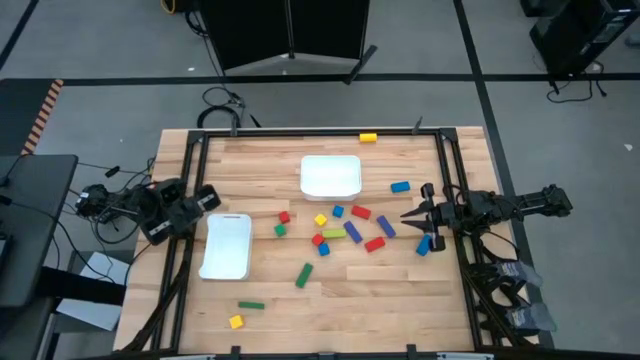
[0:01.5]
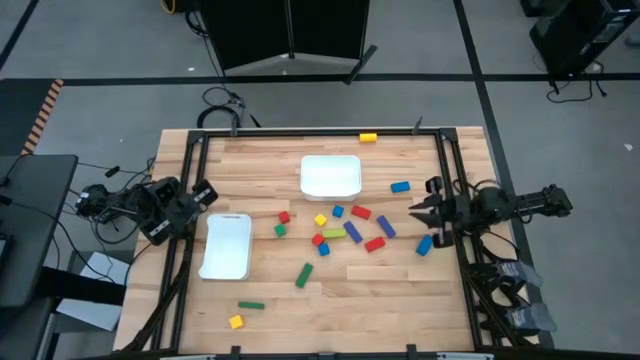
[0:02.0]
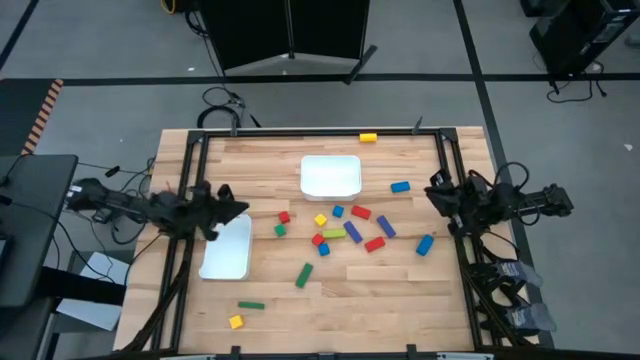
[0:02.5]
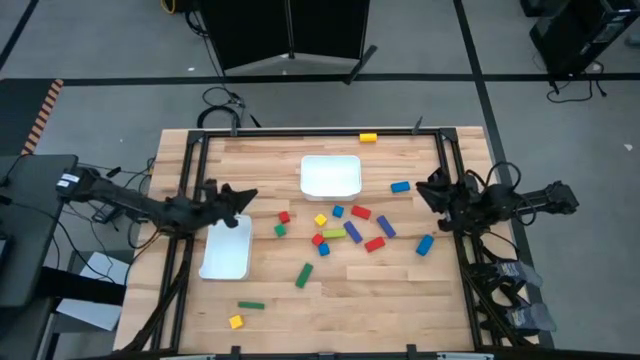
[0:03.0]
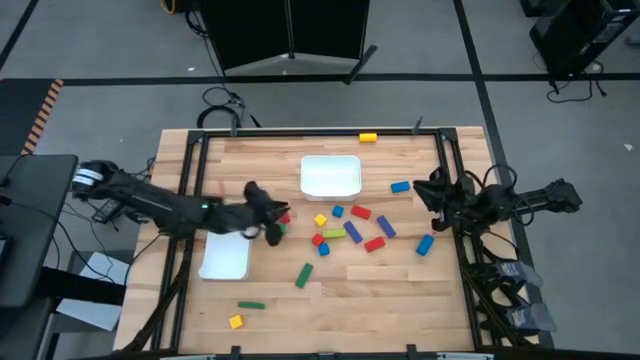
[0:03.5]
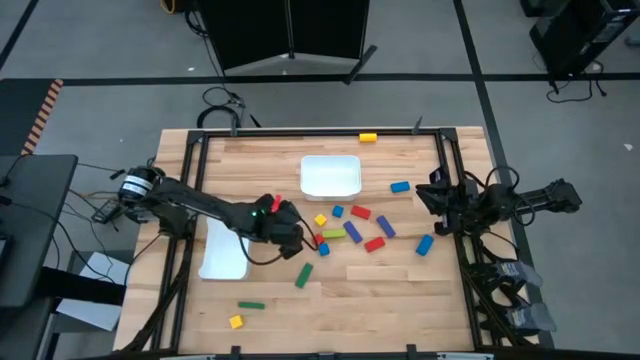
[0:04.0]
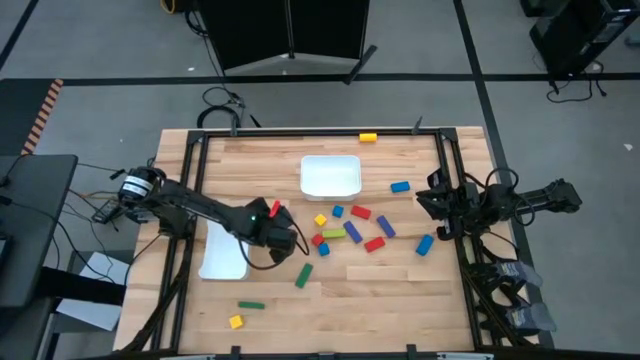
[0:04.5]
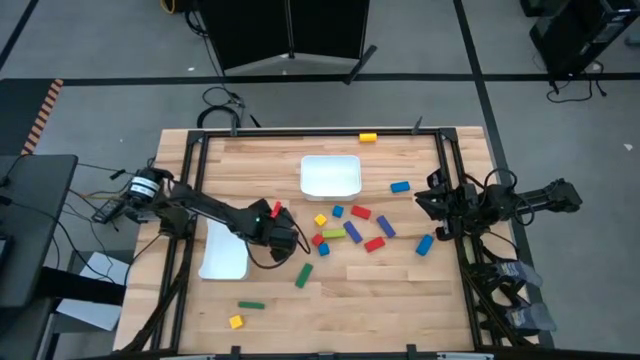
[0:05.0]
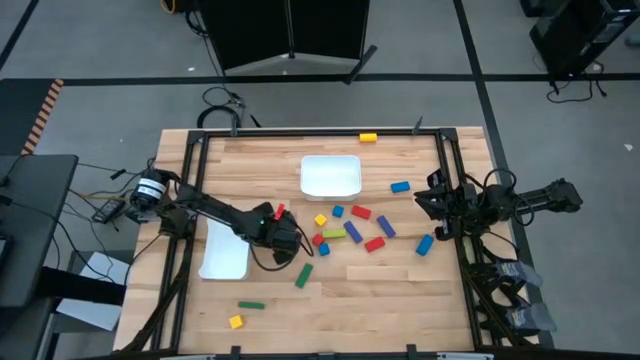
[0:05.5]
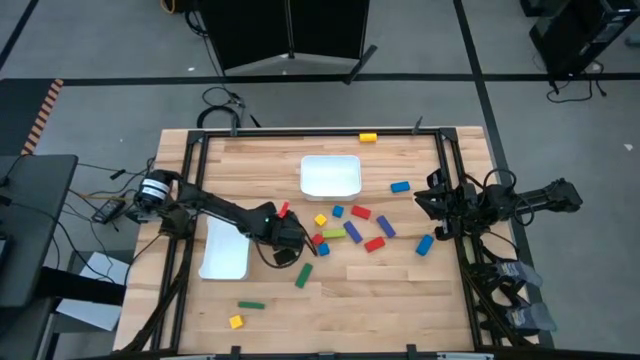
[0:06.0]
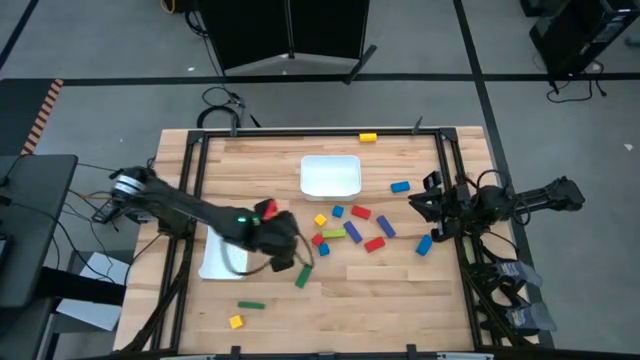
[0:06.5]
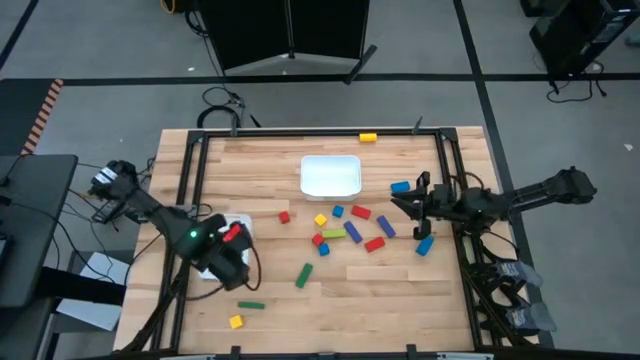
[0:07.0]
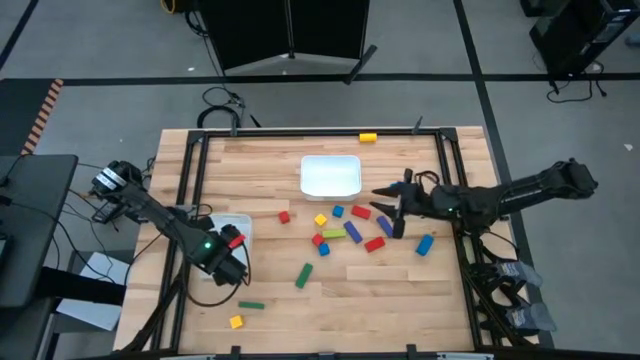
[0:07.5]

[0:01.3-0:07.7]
Task: Sort blocks by size
Put the square green block into the bottom white bin

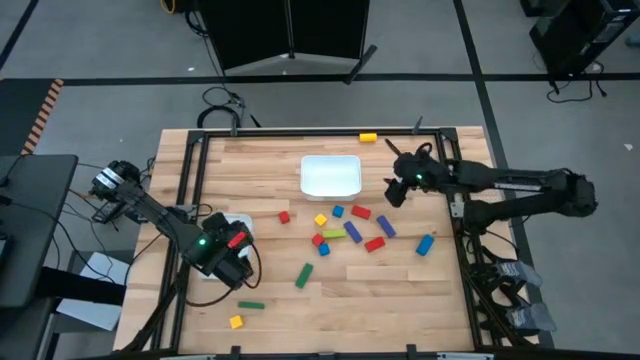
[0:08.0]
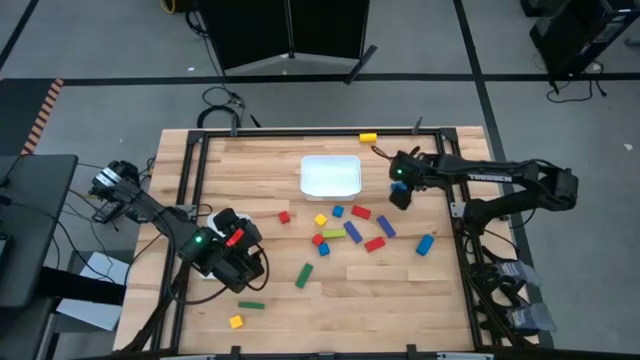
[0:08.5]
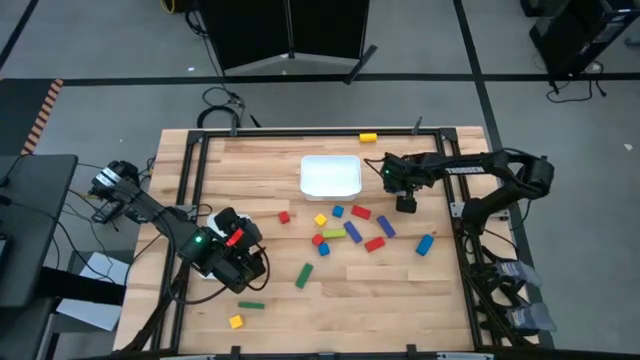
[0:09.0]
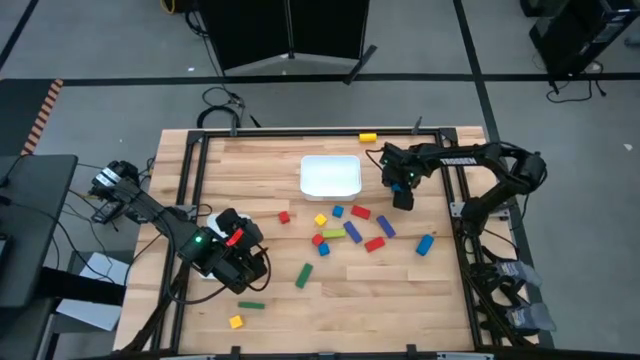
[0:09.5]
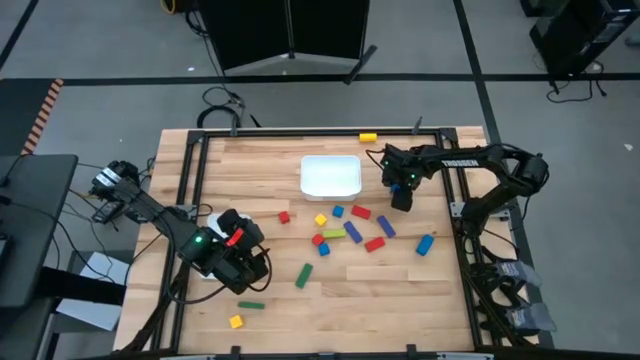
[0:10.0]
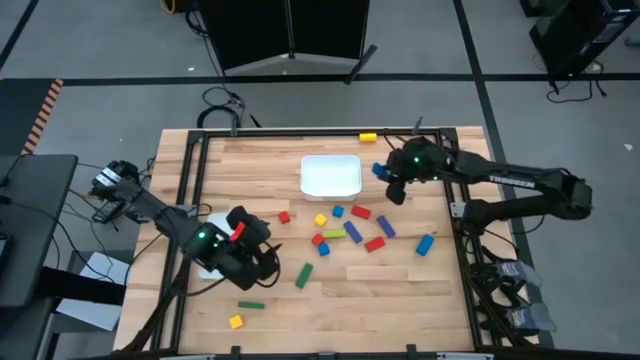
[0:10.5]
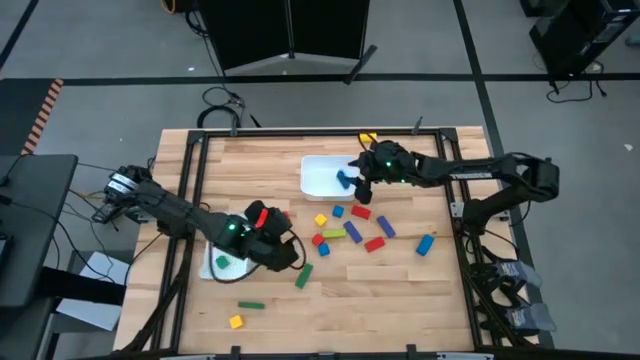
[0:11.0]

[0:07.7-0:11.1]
Put the rectangular blue block into the top white bin

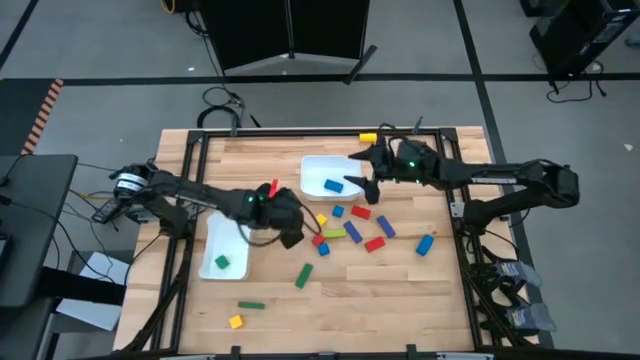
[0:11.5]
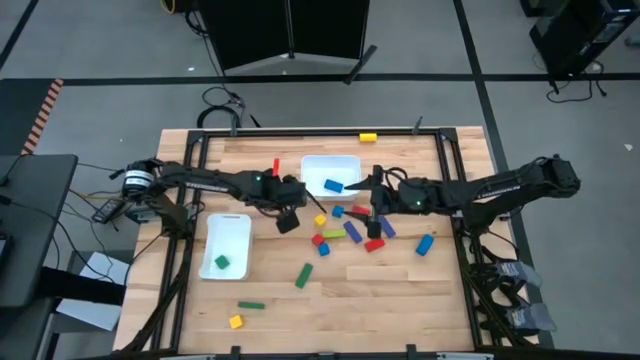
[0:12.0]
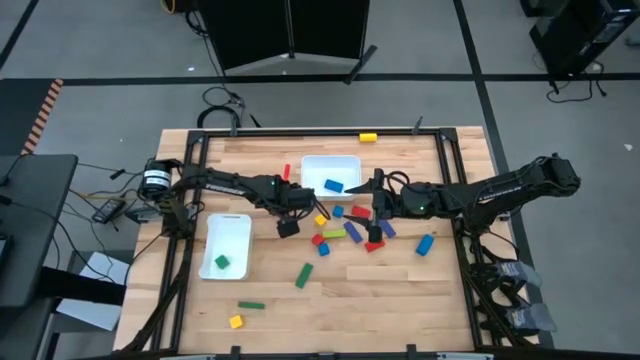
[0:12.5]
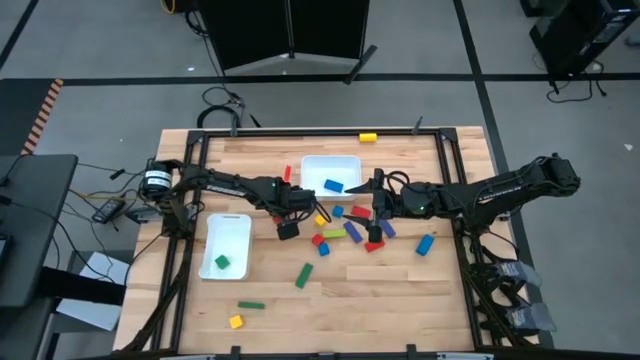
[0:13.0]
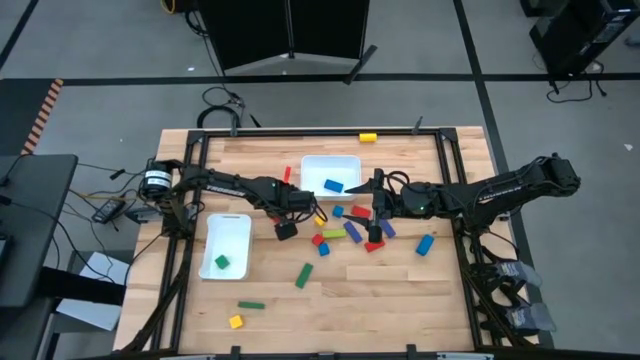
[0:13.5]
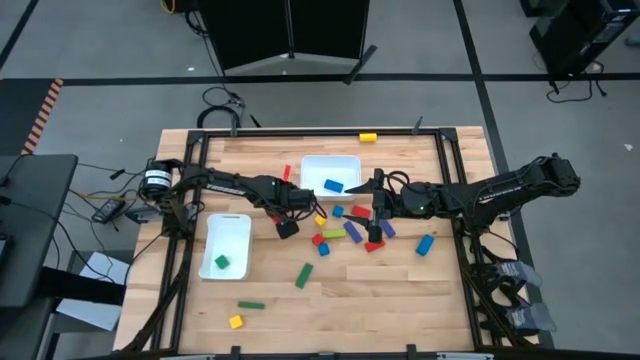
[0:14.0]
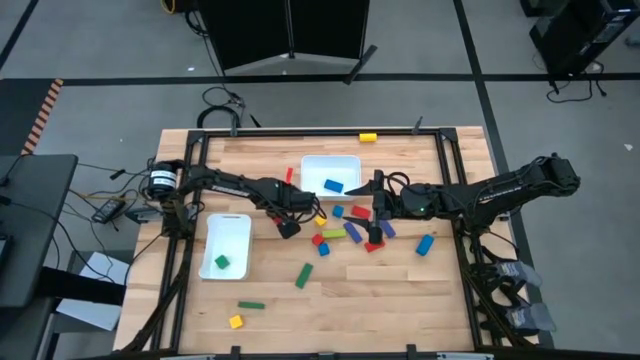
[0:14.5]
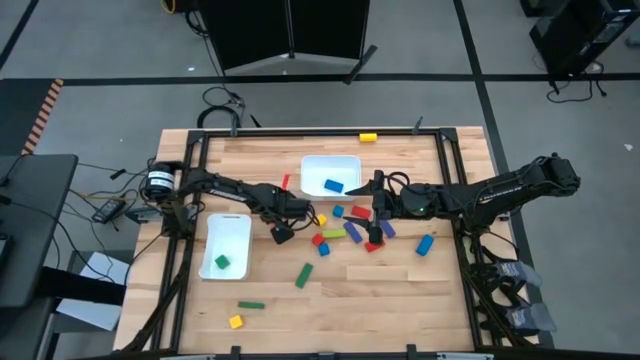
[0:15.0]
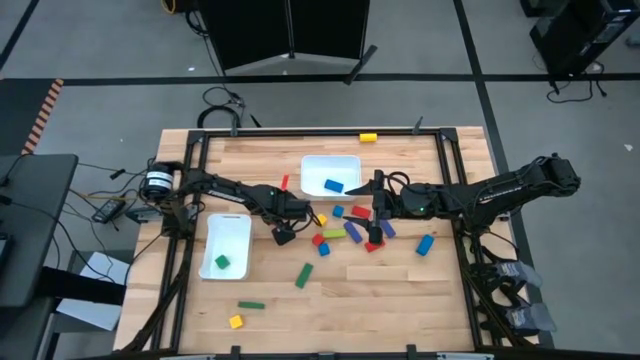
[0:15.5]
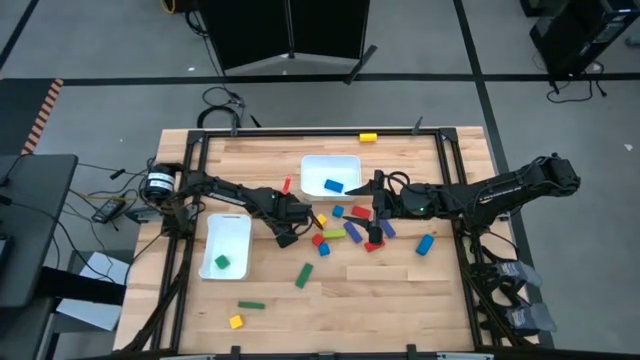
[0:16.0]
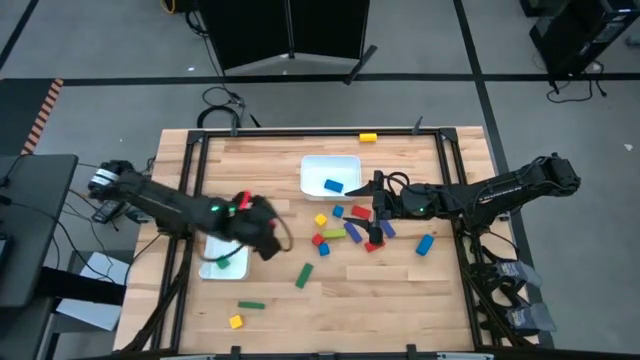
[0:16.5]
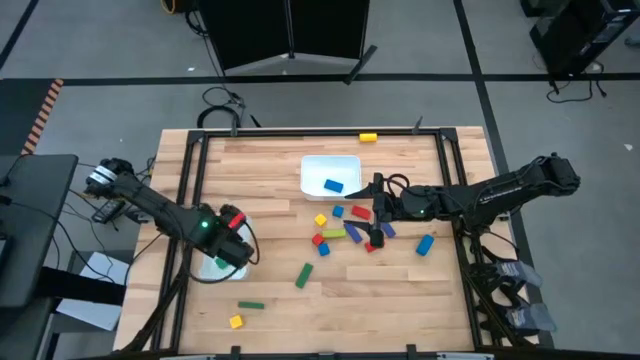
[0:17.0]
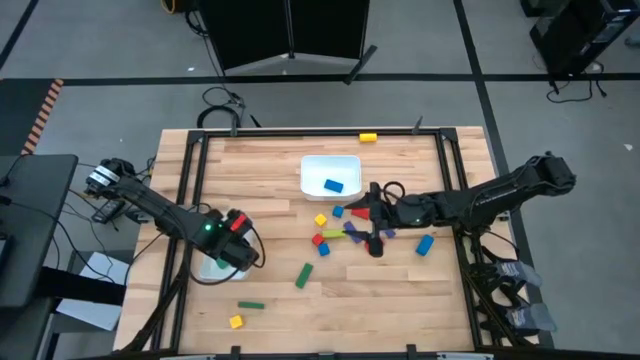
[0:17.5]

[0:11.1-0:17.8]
Put the square red block into the bottom white bin

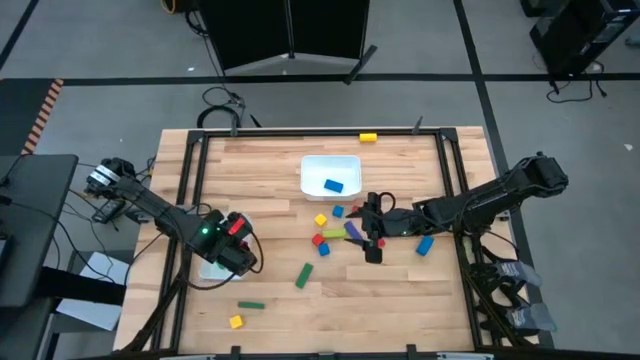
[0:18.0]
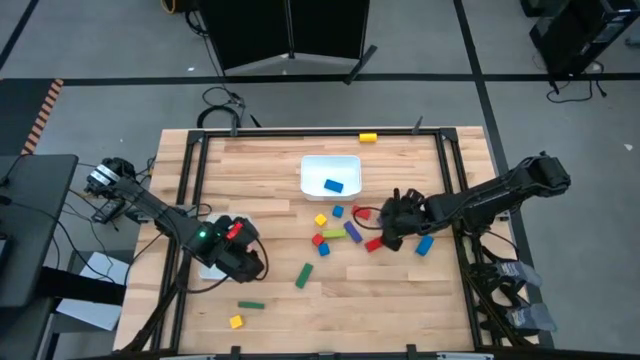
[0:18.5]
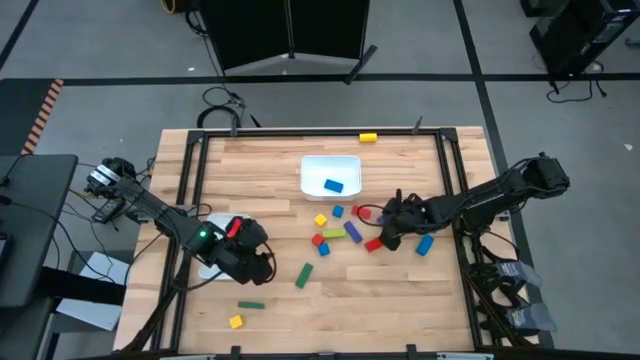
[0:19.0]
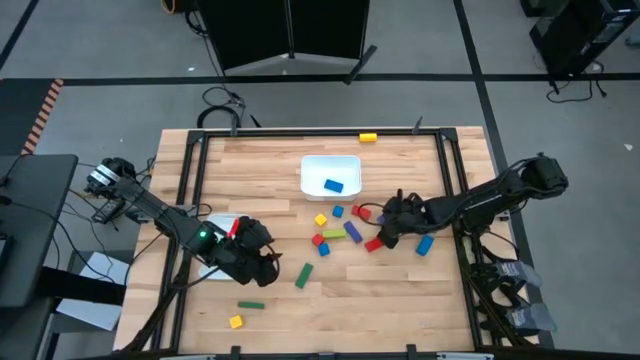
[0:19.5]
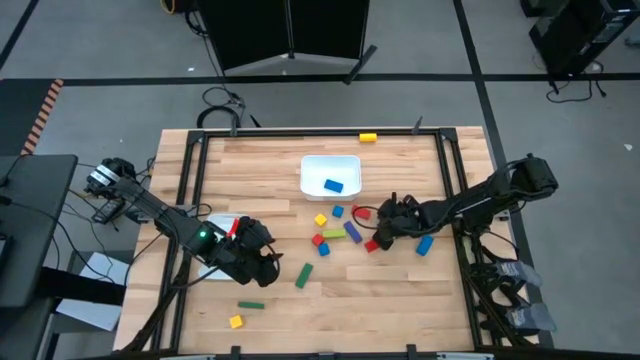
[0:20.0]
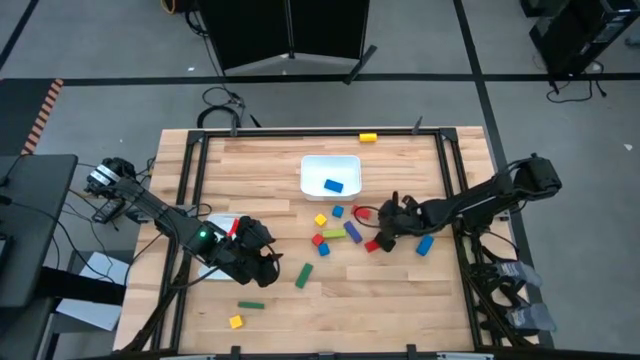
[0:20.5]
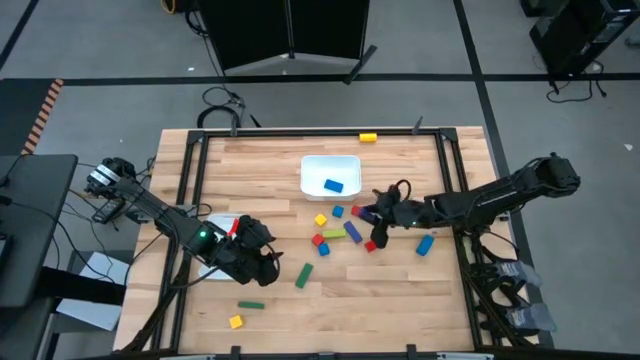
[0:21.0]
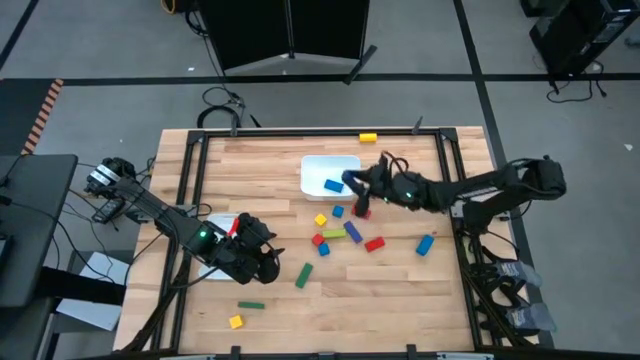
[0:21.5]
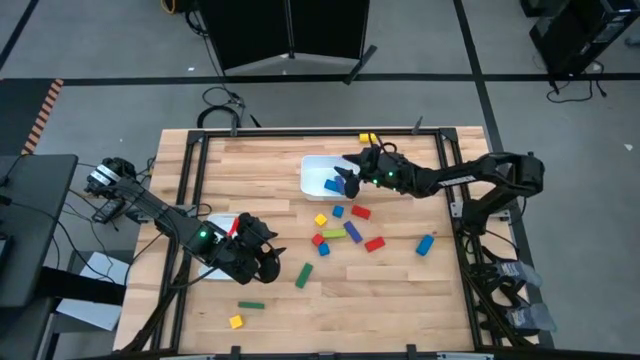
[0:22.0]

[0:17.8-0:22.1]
Put the rectangular violet block into the top white bin
